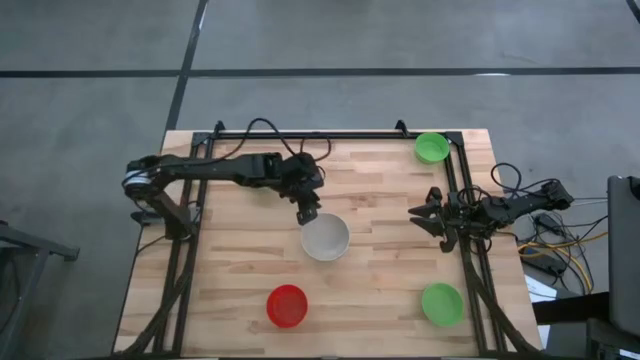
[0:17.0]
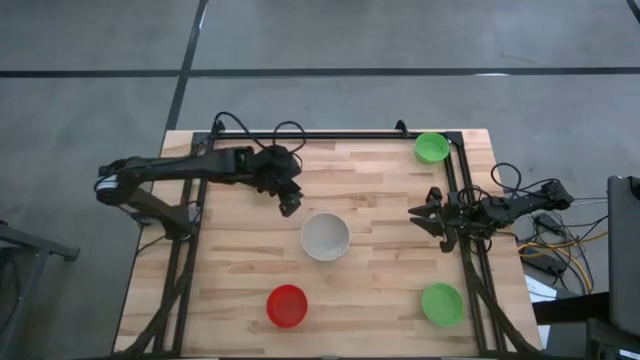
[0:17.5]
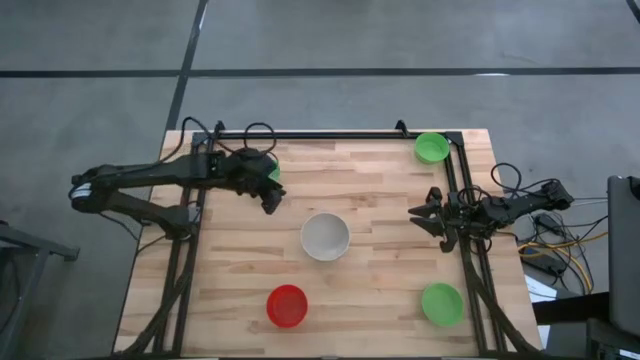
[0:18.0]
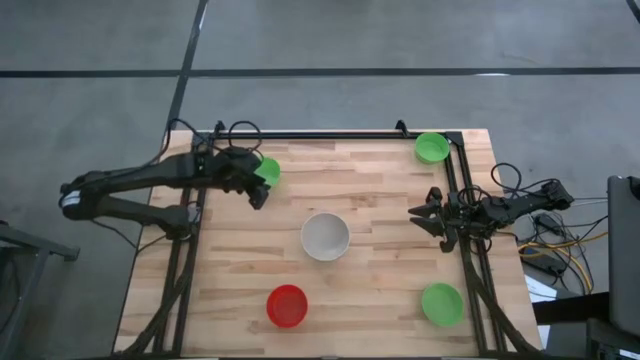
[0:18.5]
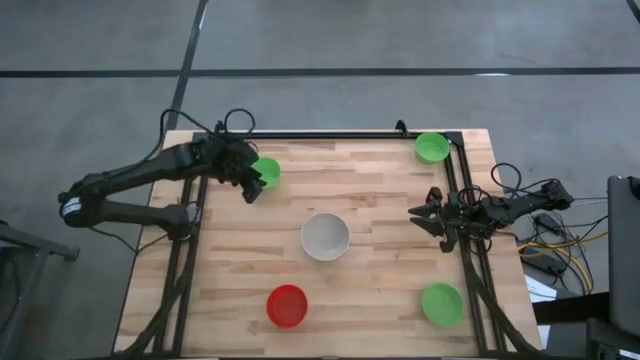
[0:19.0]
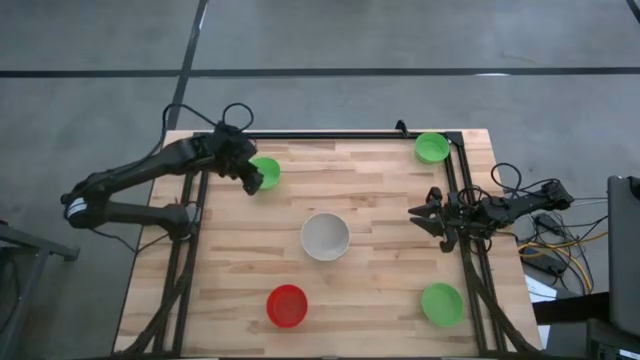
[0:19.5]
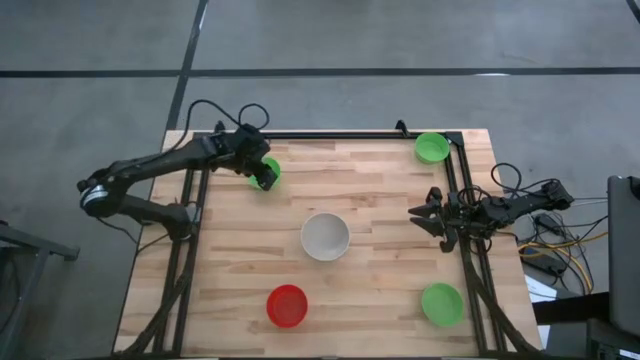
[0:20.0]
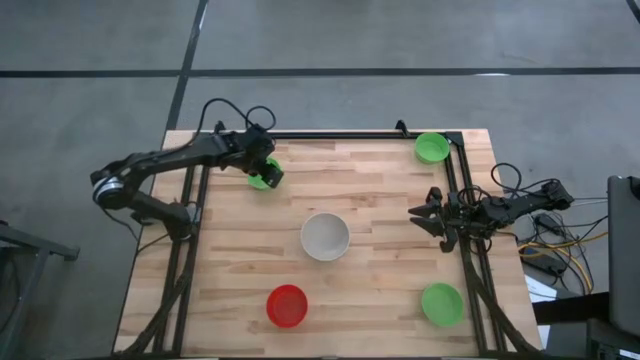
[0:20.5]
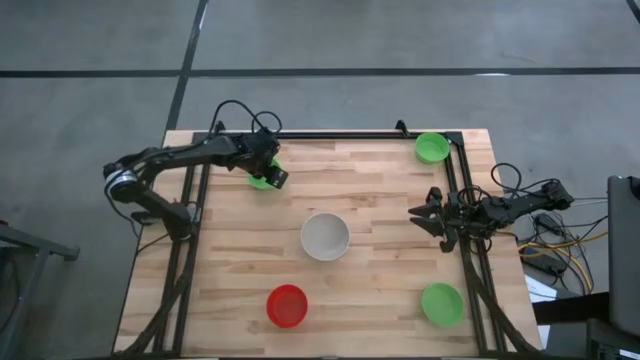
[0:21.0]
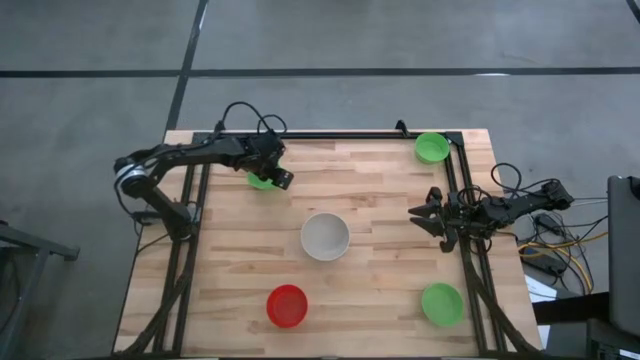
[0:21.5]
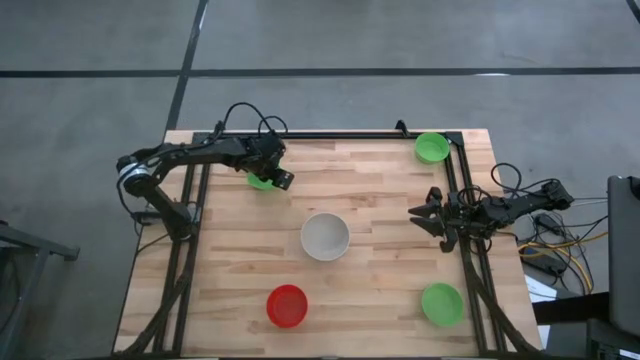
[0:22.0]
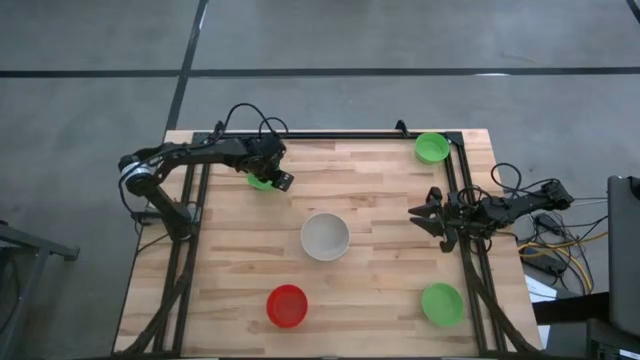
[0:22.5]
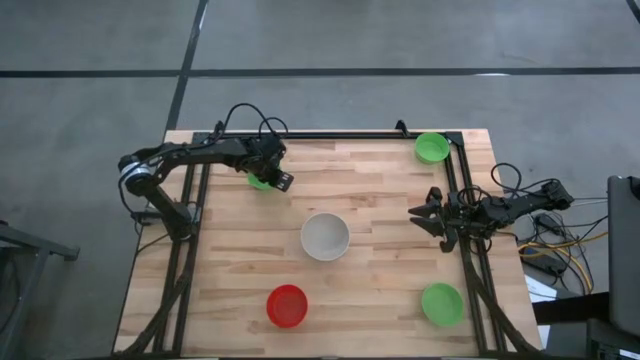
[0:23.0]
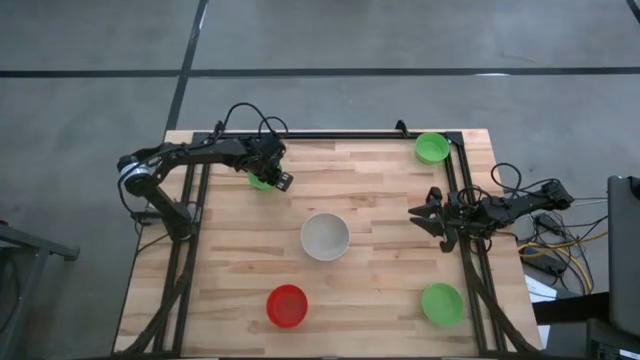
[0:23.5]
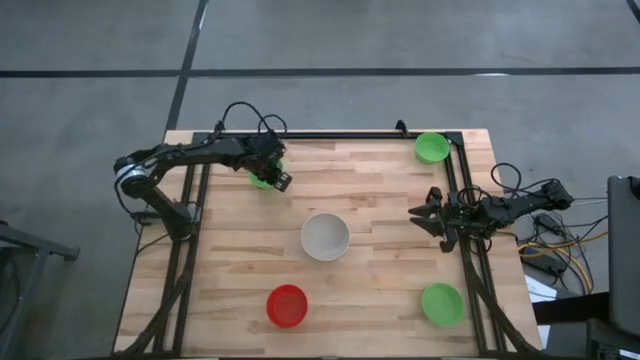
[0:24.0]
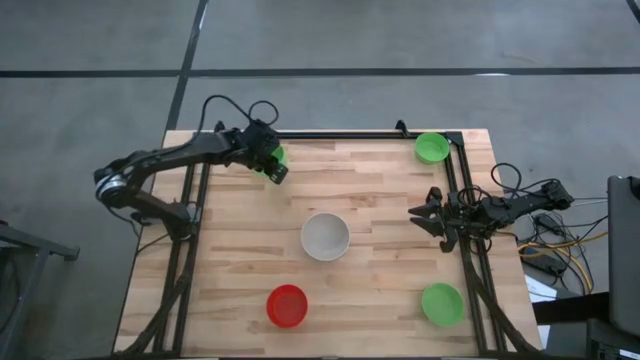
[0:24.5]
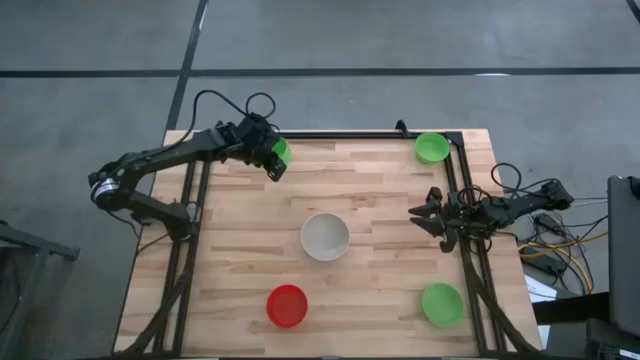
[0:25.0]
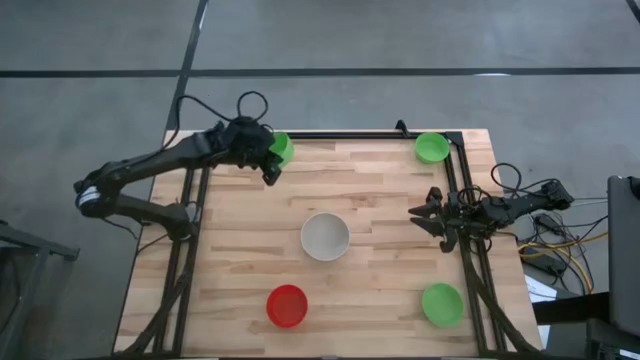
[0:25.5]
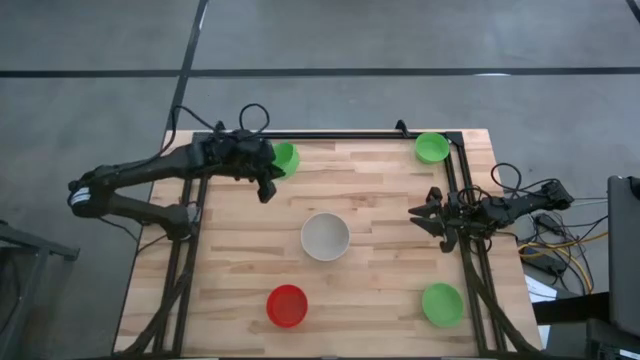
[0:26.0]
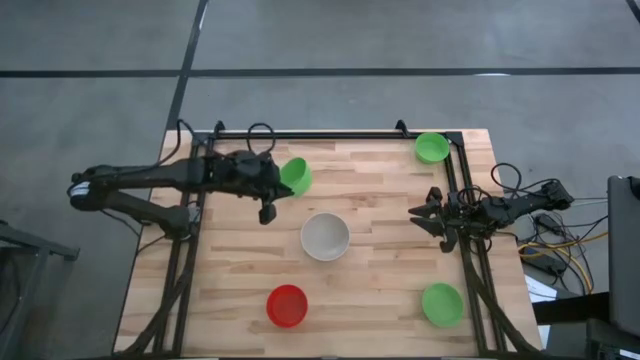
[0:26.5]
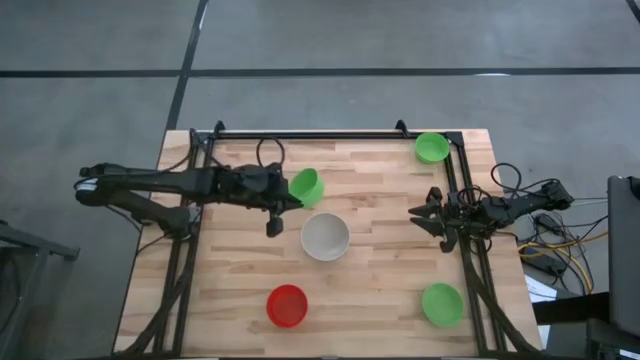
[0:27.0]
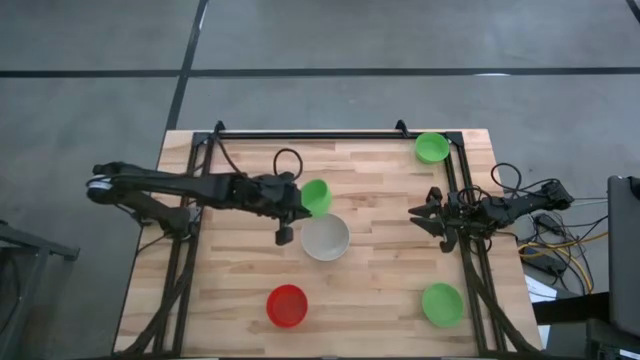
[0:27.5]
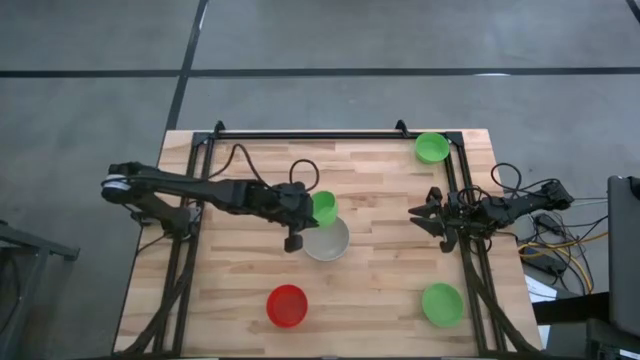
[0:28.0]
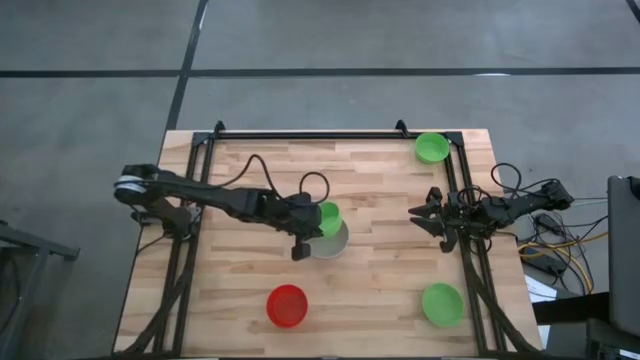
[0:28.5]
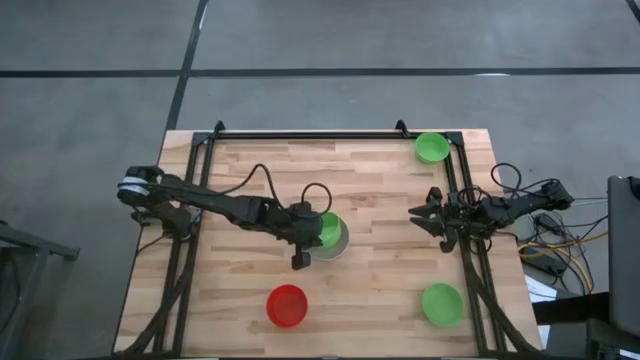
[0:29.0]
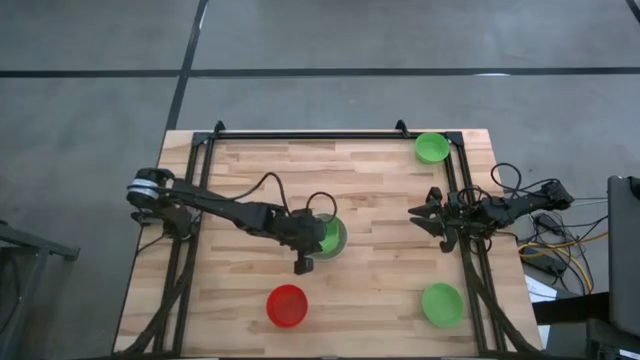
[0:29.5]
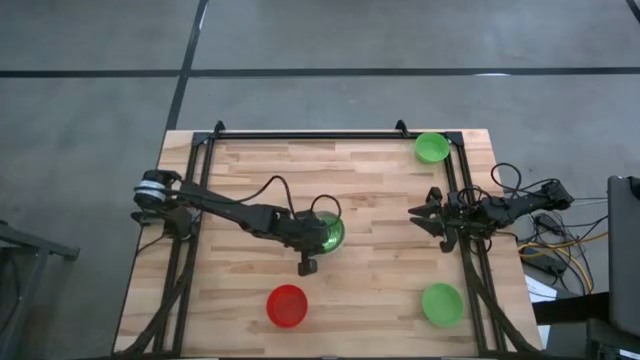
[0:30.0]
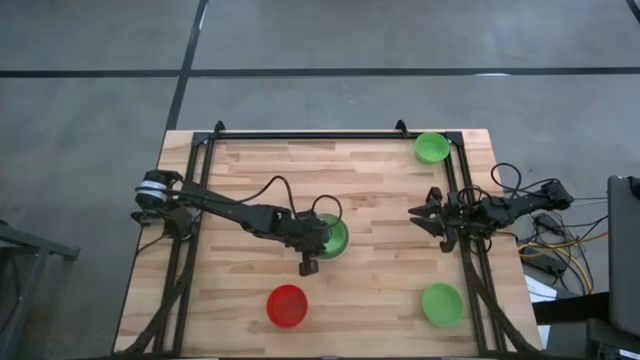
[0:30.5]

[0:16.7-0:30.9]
Stack the top left green bowl on the top of the gray bowl

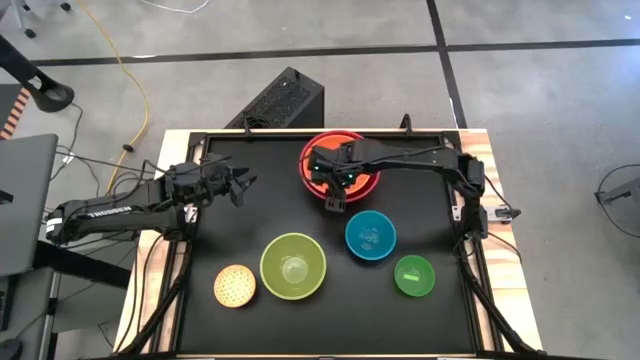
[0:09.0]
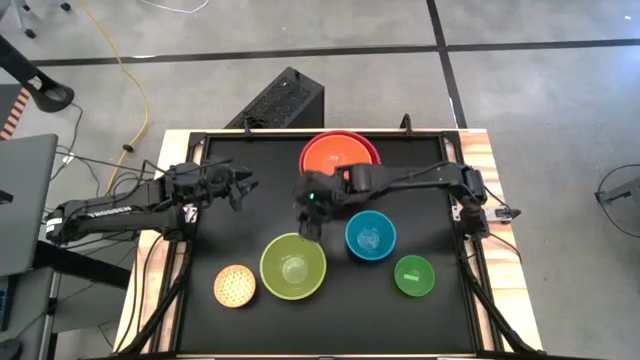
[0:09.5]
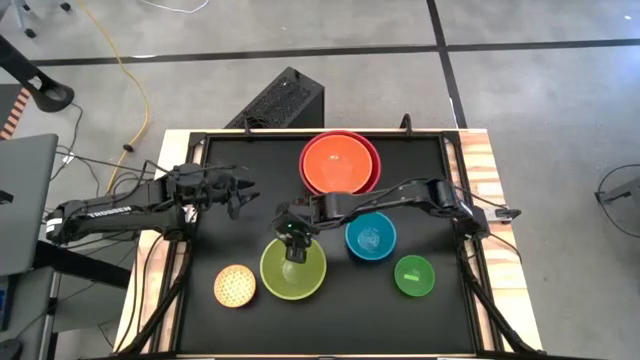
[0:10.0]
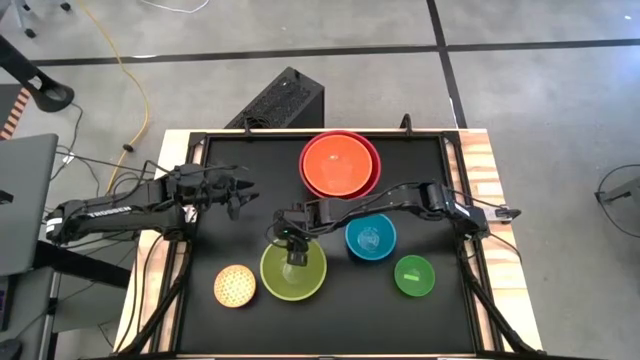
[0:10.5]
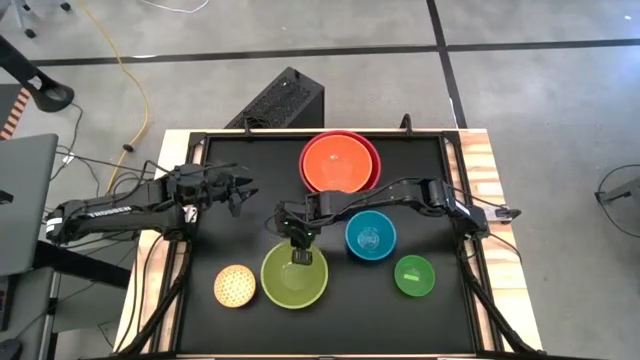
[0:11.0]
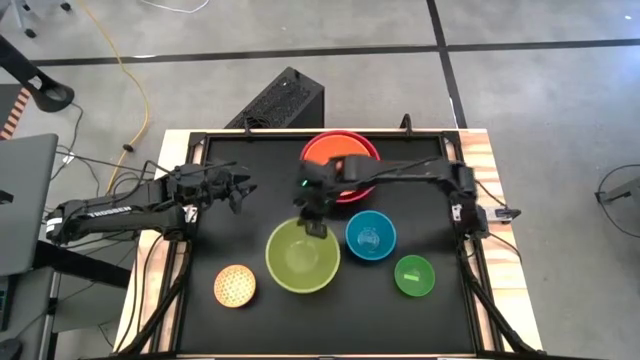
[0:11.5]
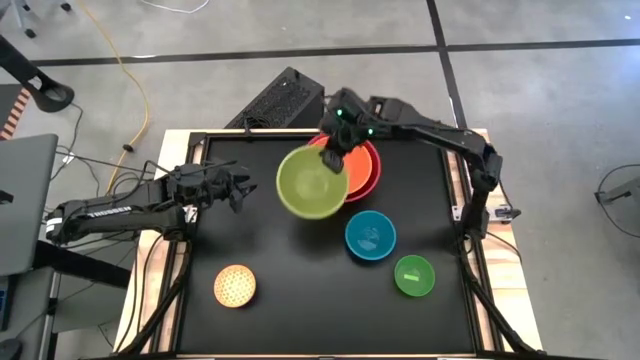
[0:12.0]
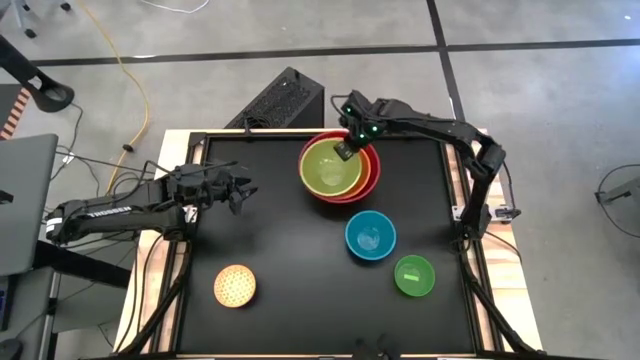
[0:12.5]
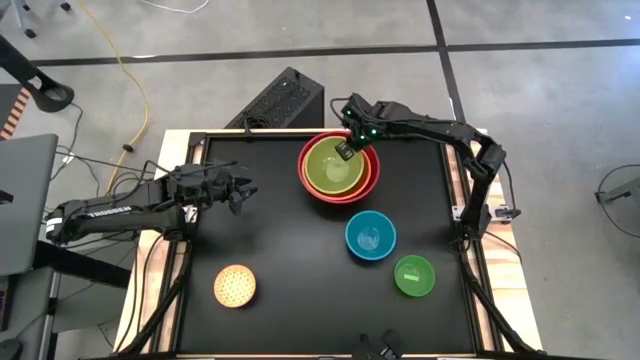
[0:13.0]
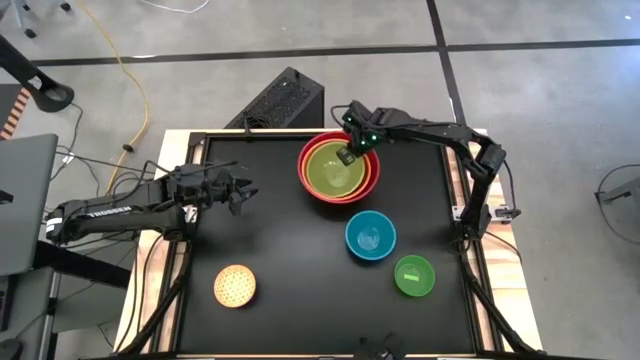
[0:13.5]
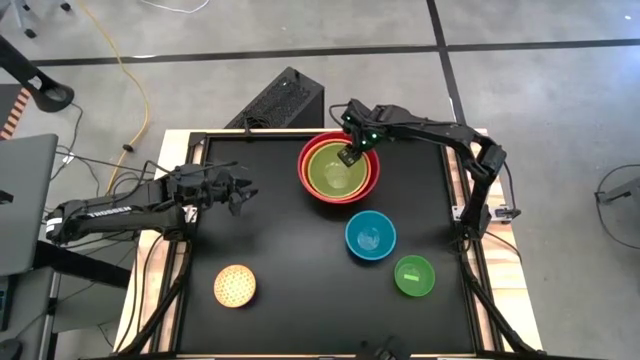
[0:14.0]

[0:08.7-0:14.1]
Stack the light green bowl on top of the orange bowl

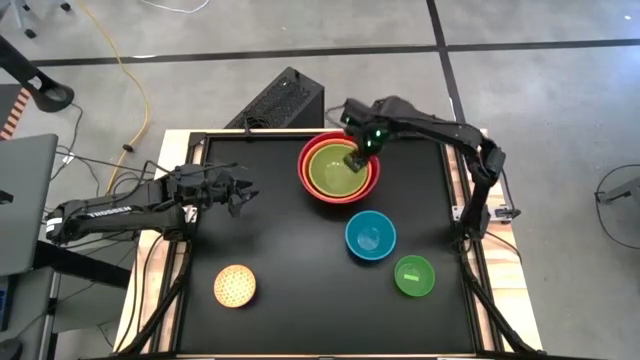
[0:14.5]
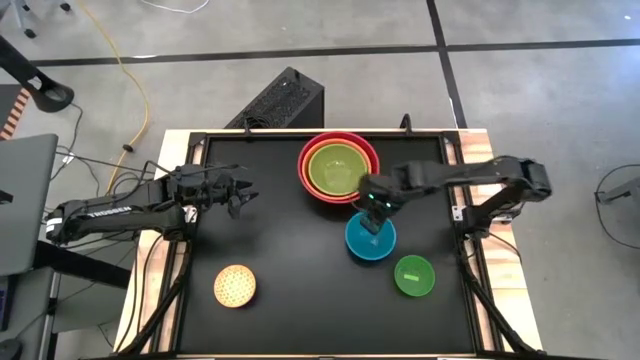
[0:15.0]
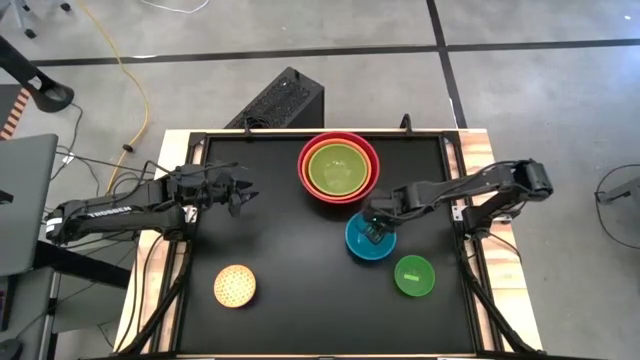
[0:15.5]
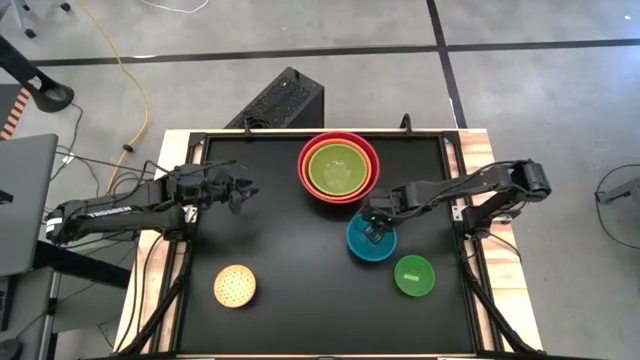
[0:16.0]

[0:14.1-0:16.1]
Stack the blue bowl on top of the light green bowl
